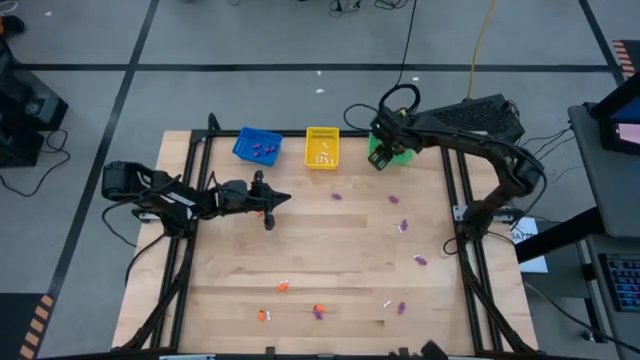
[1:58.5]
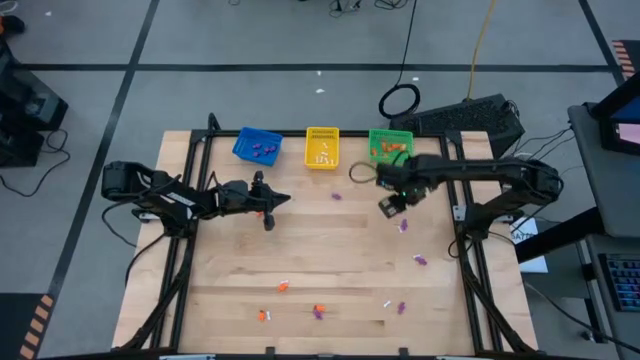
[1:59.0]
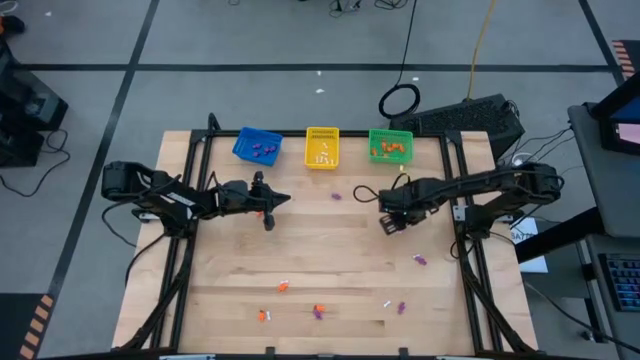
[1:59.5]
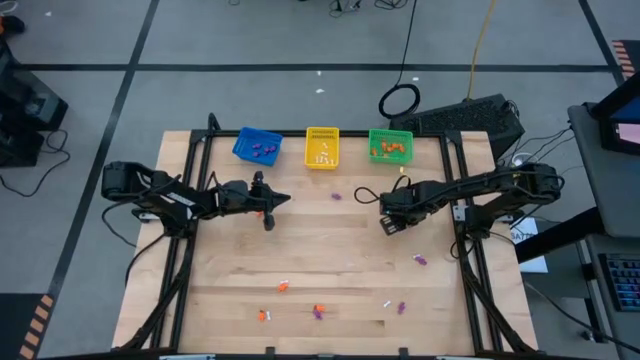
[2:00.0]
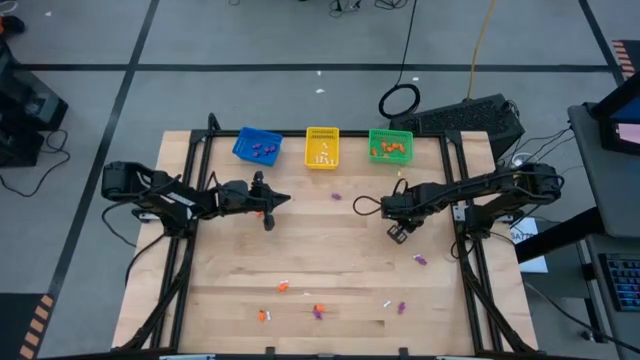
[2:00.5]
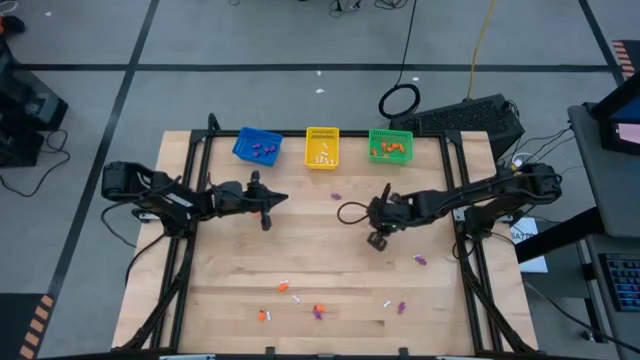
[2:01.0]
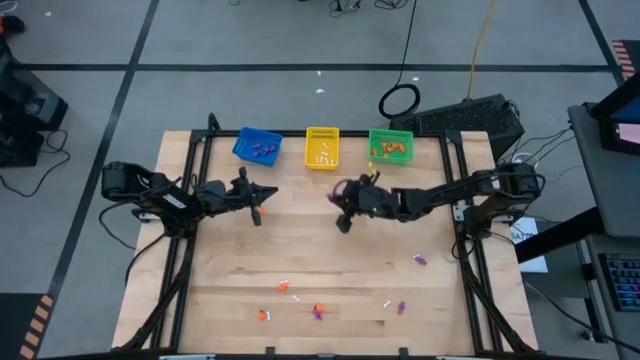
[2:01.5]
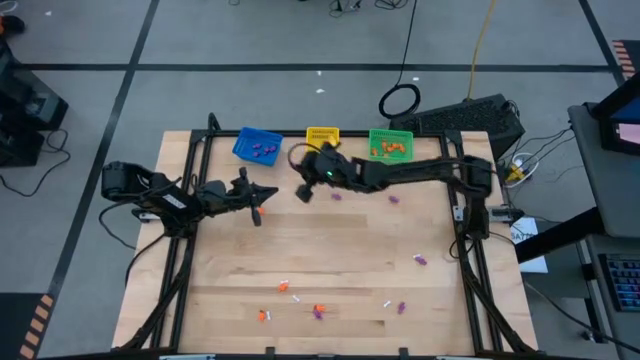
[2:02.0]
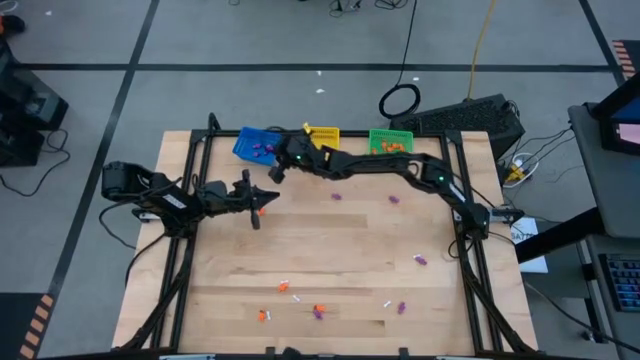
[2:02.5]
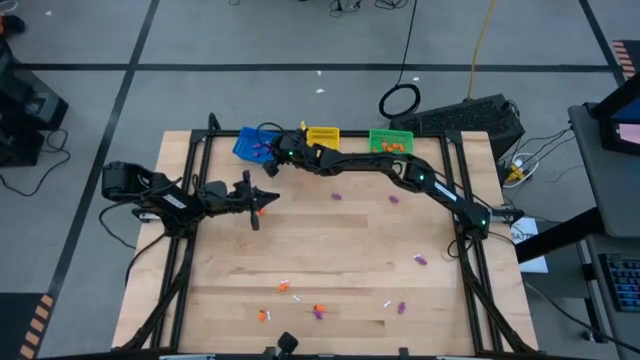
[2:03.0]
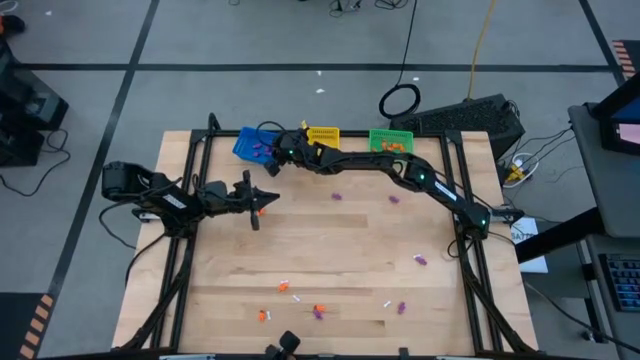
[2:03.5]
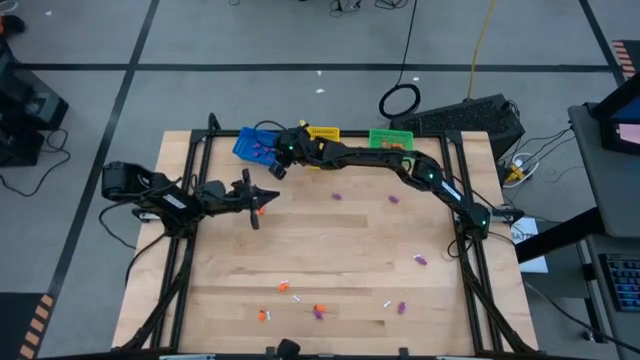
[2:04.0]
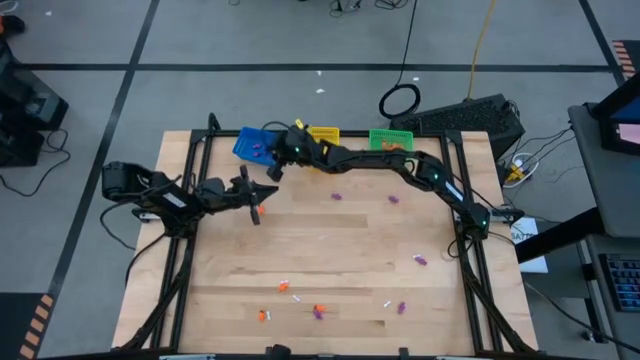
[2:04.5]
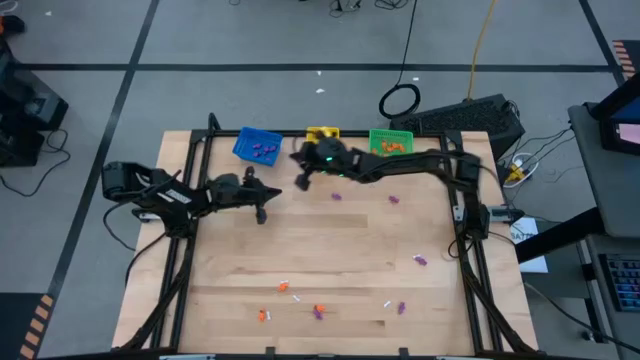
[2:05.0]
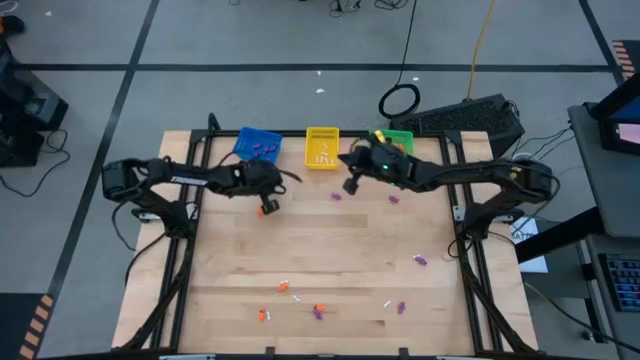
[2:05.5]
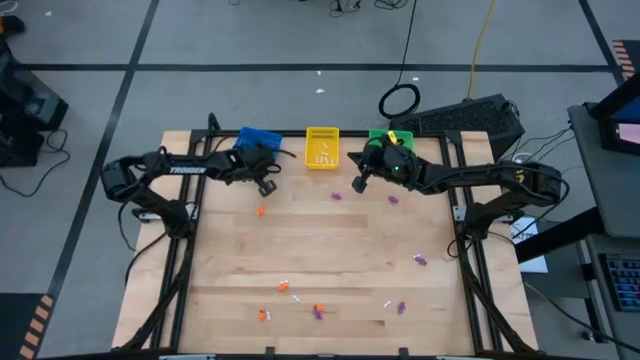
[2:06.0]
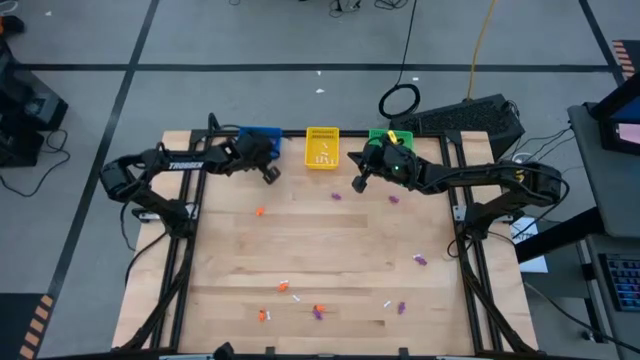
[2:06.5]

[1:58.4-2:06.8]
Task: Sort Halloween decoration
Put the violet skeleton toy into the blue bin

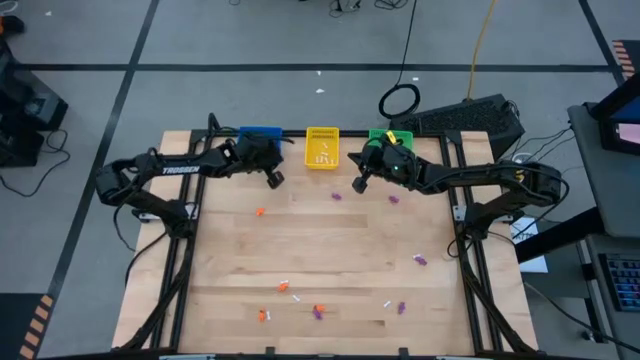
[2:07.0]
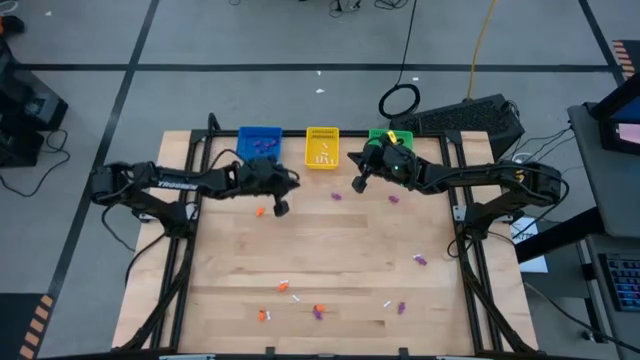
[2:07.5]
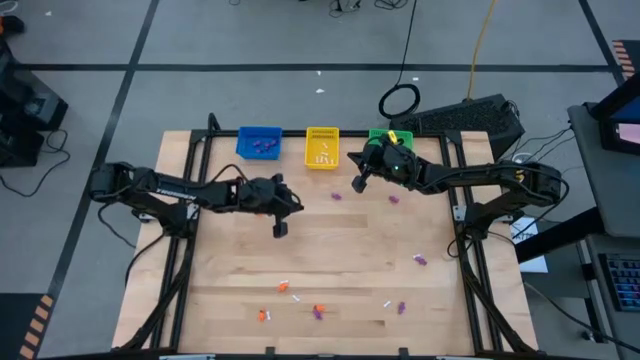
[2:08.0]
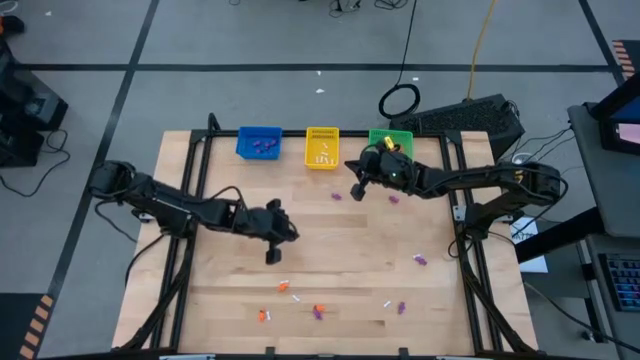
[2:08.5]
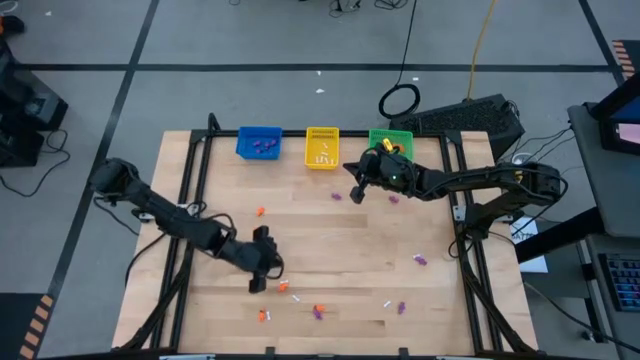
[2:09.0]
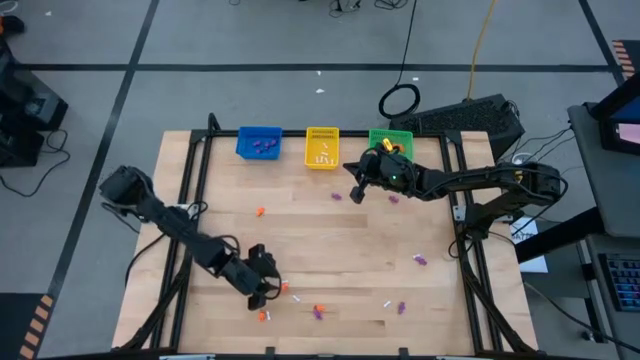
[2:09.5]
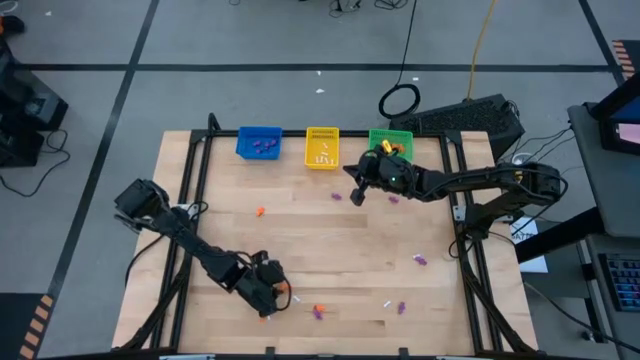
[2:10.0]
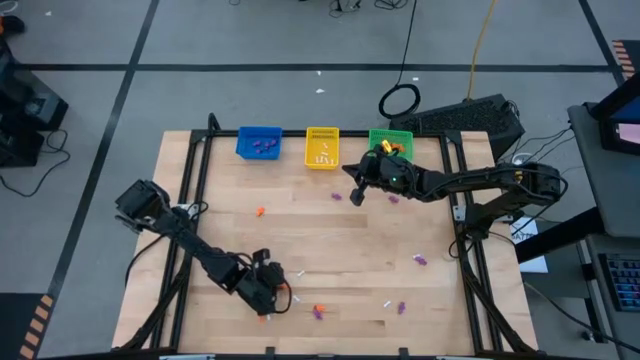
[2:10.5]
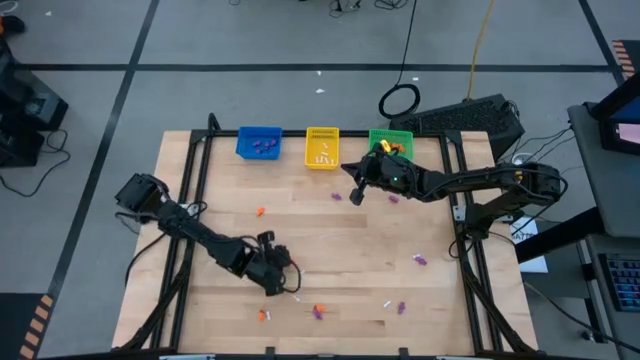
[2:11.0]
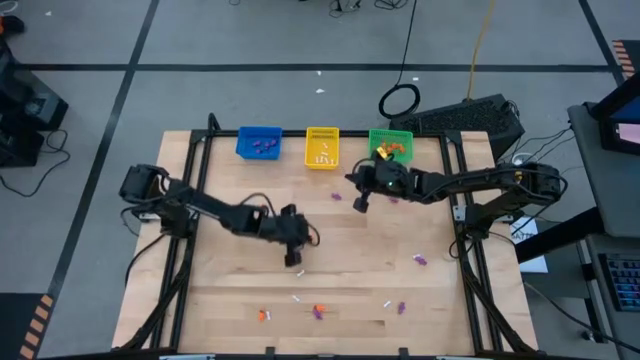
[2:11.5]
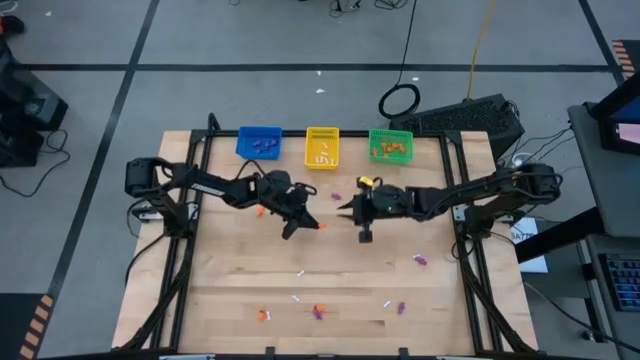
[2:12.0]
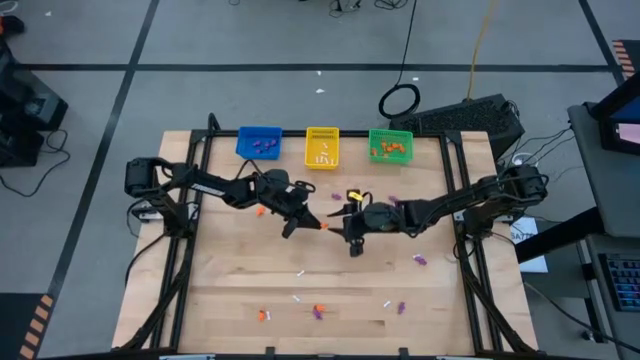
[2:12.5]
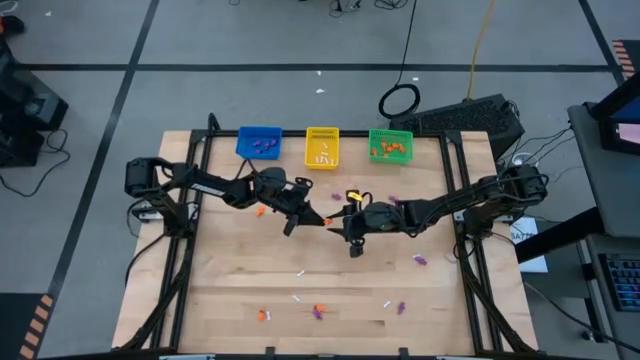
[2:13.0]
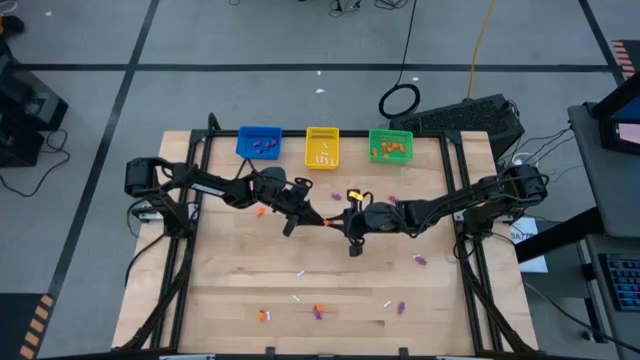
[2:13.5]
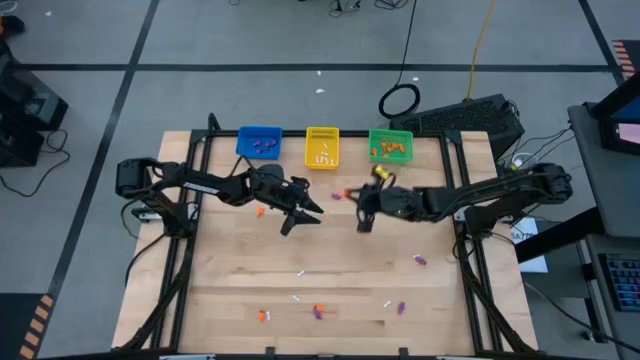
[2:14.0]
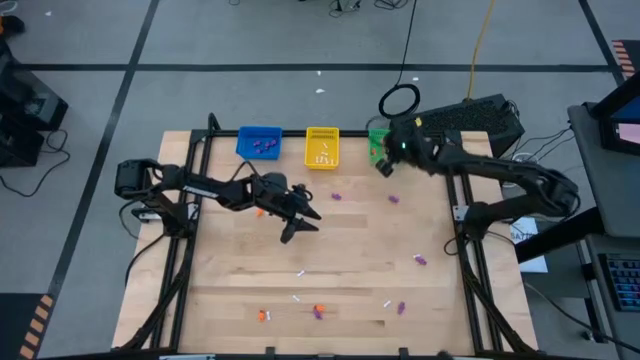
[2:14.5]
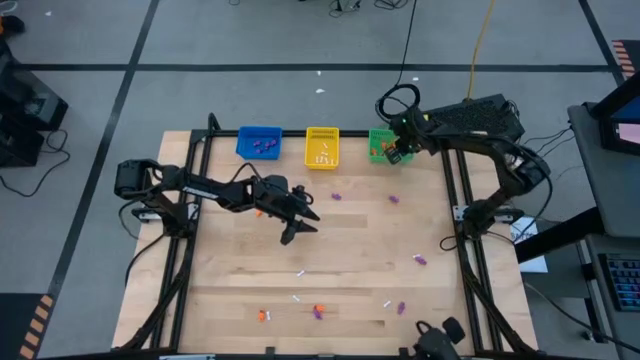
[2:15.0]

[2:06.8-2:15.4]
Put the orange skeleton toy into the green bin

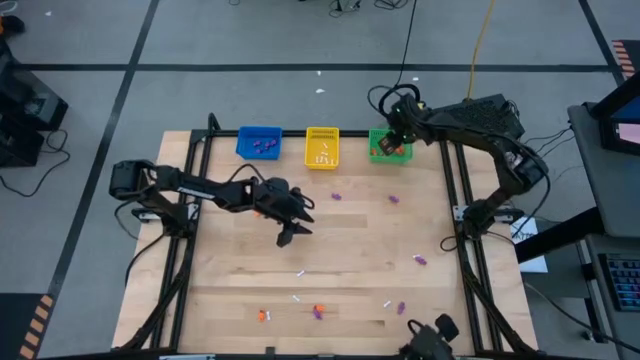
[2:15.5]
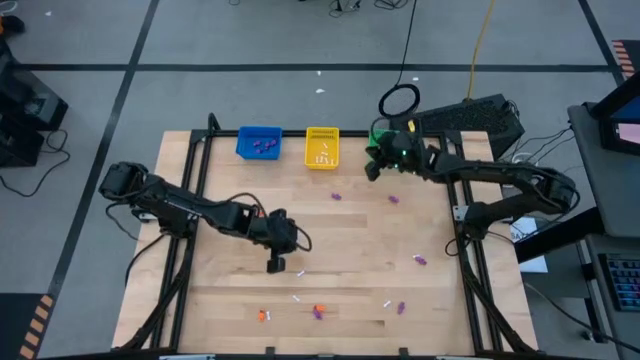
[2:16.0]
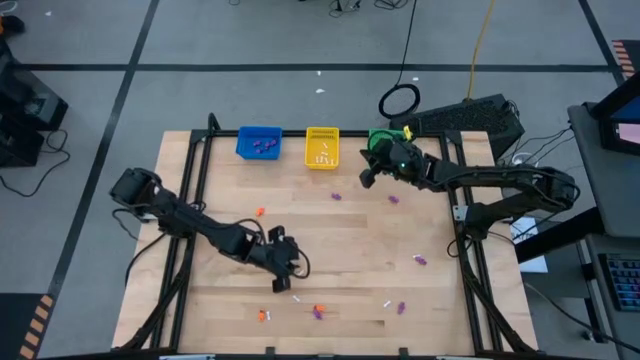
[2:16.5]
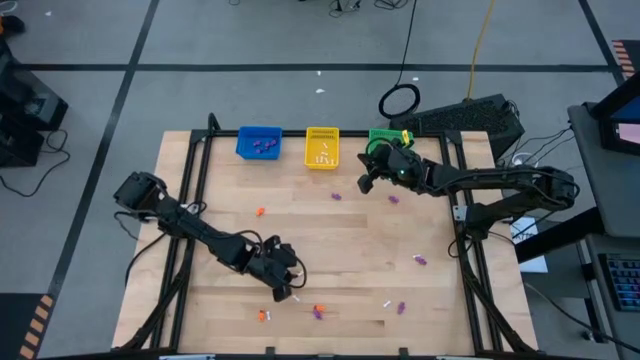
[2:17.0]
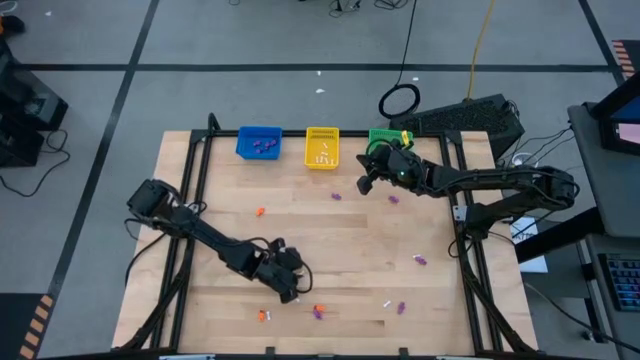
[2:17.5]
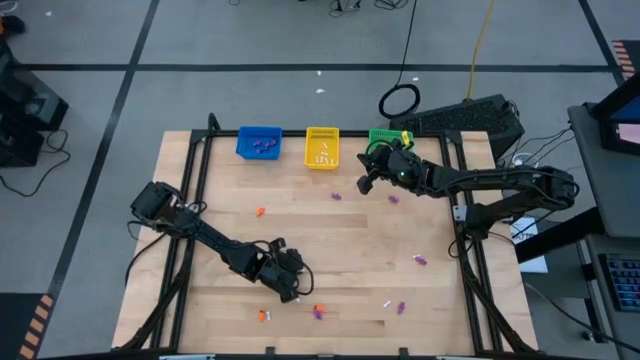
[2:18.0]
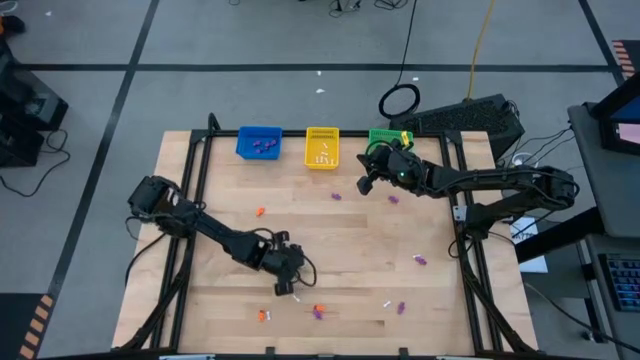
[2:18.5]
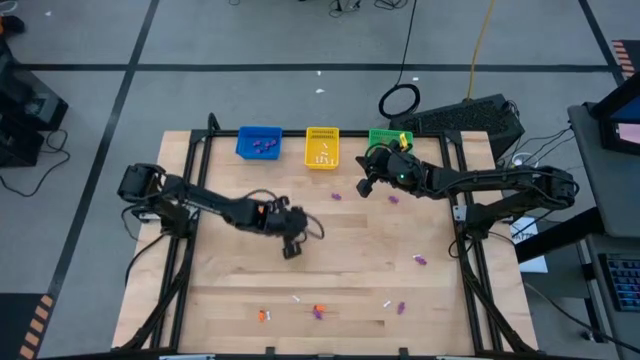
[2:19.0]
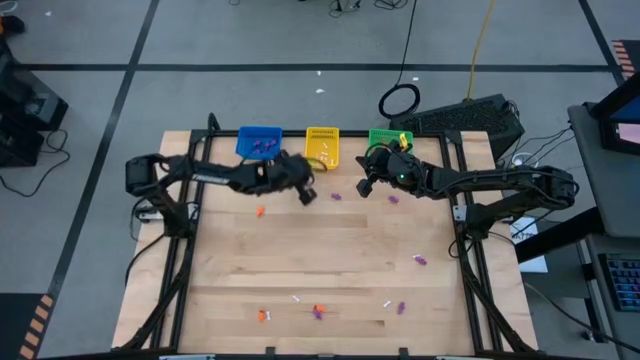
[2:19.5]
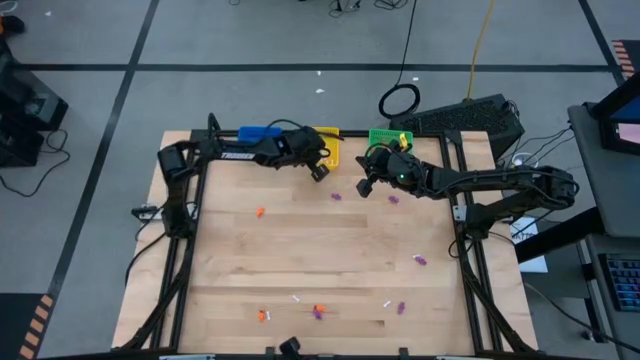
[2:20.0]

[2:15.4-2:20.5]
Put the white bone toy into the yellow bin
